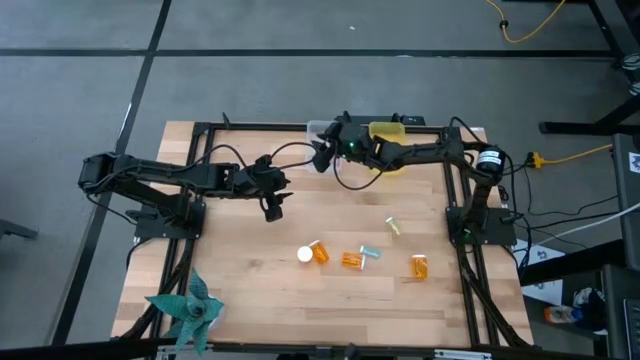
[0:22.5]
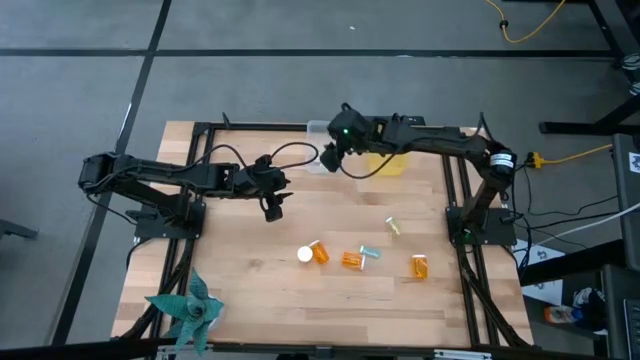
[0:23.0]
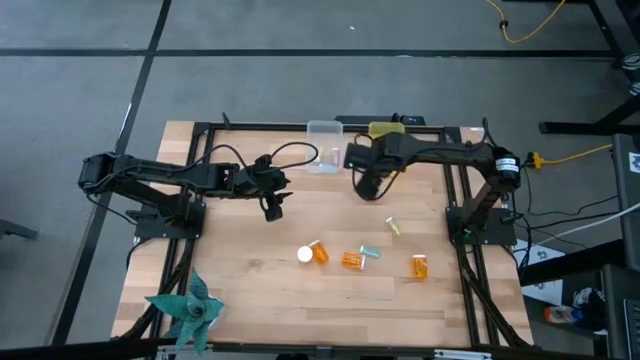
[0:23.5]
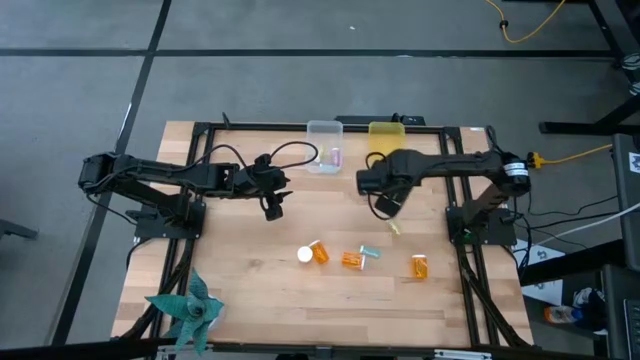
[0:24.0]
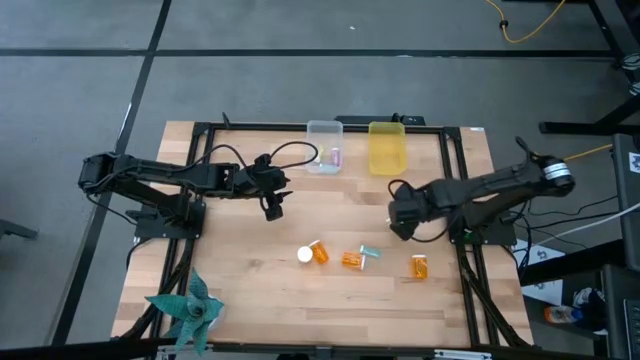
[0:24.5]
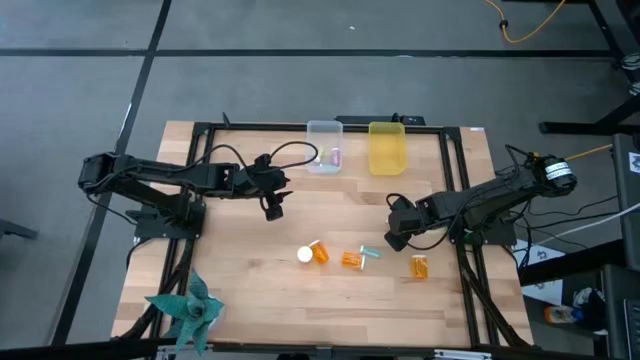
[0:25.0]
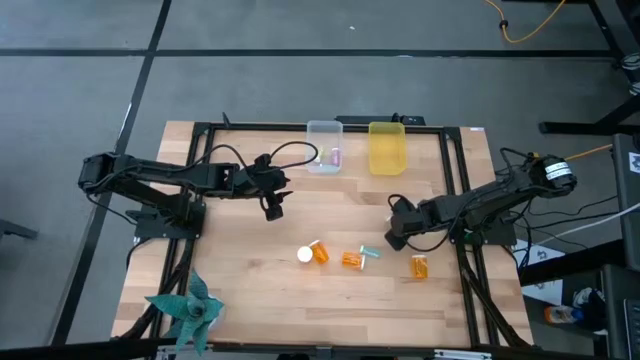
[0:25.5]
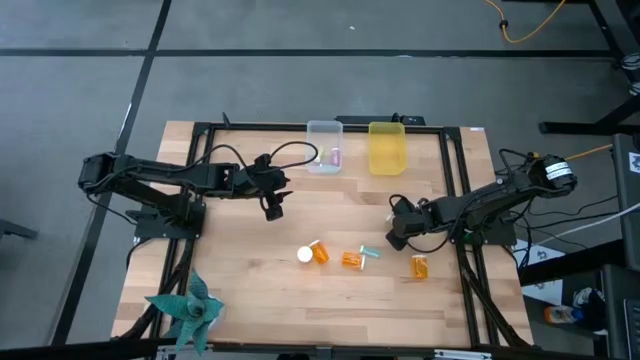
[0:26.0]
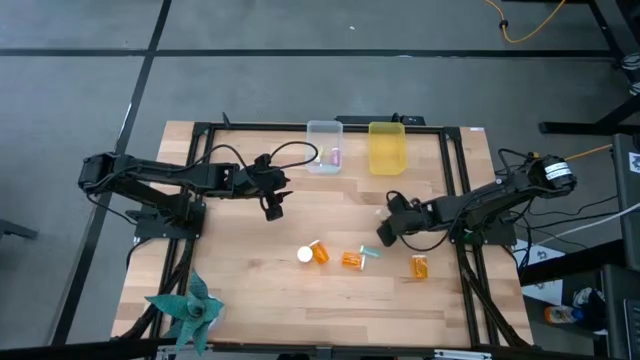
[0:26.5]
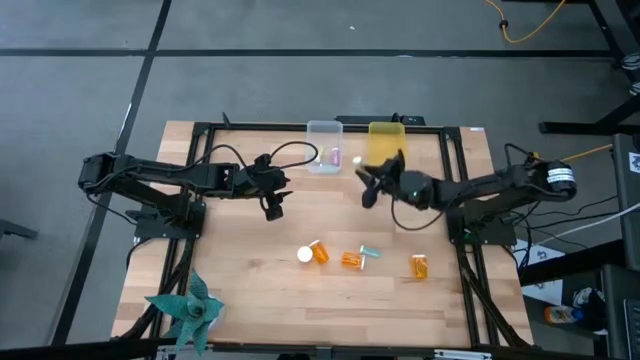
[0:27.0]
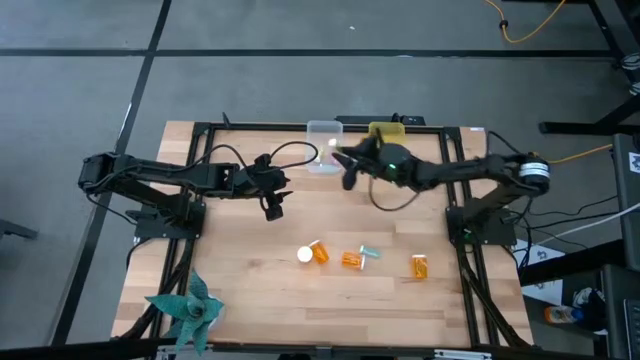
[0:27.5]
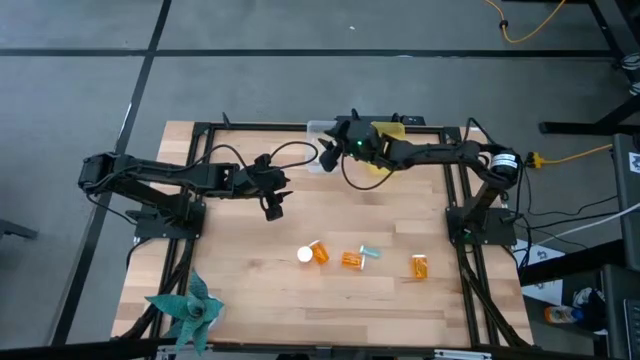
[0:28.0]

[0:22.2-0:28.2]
Task: Pick and place medicine bottles into bin by pill shape (circle, oval)
Put the small yellow pill bottle into the transparent bin

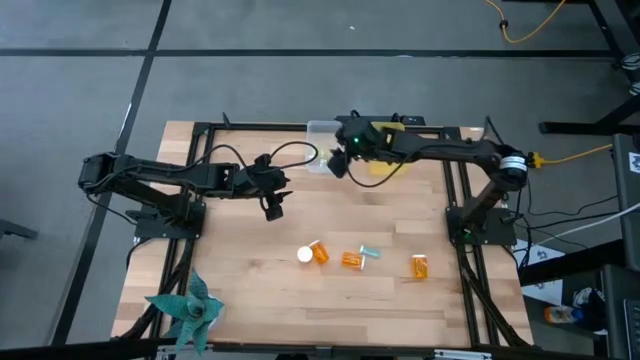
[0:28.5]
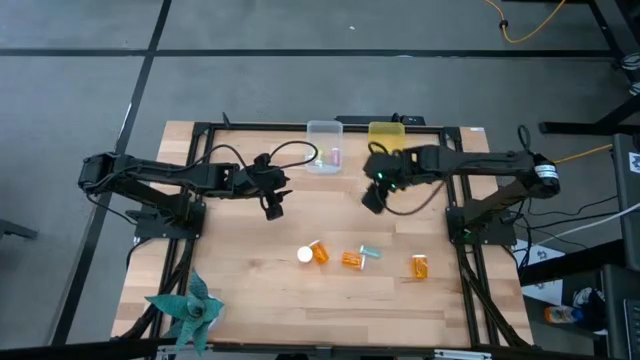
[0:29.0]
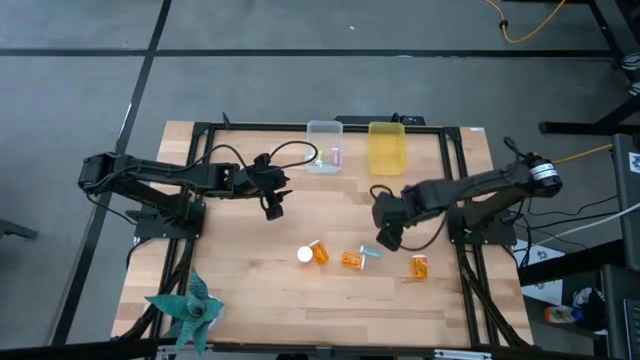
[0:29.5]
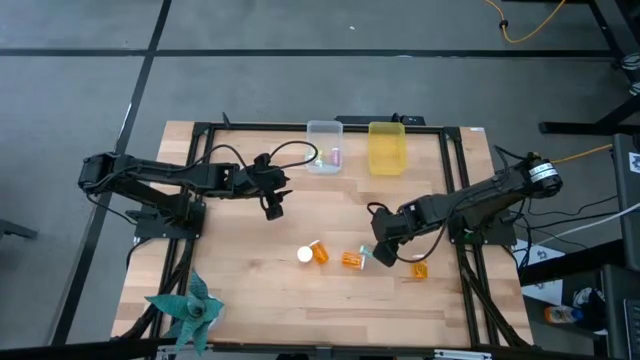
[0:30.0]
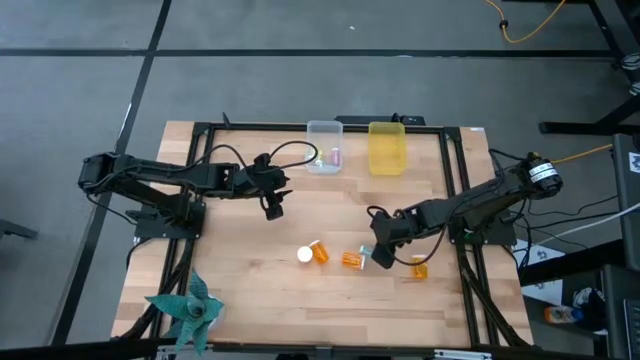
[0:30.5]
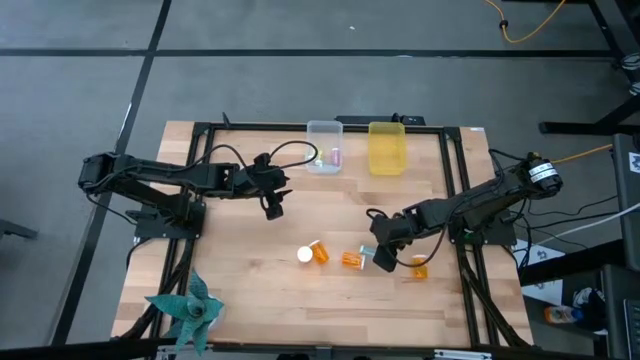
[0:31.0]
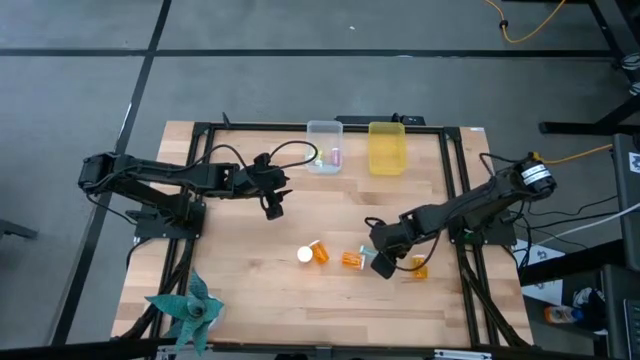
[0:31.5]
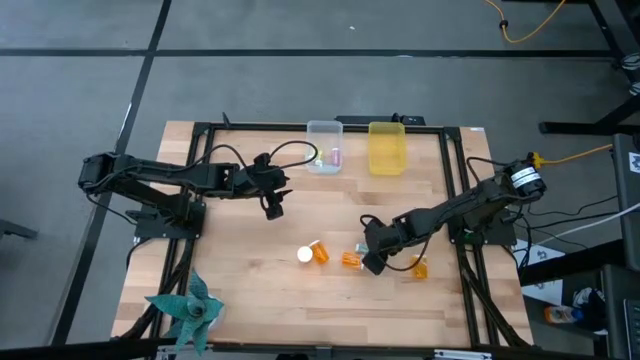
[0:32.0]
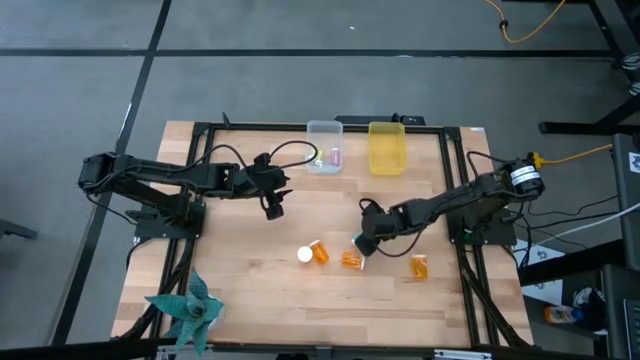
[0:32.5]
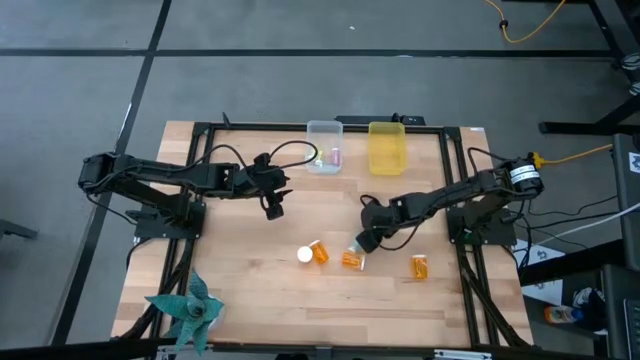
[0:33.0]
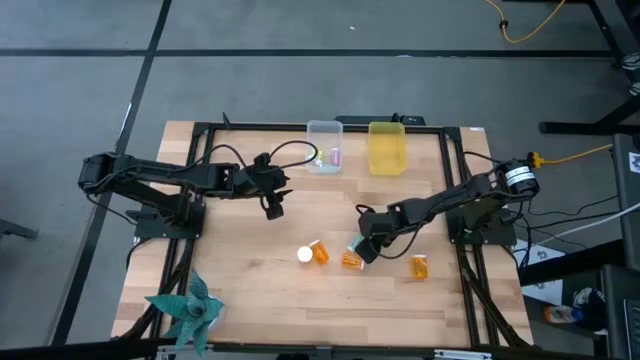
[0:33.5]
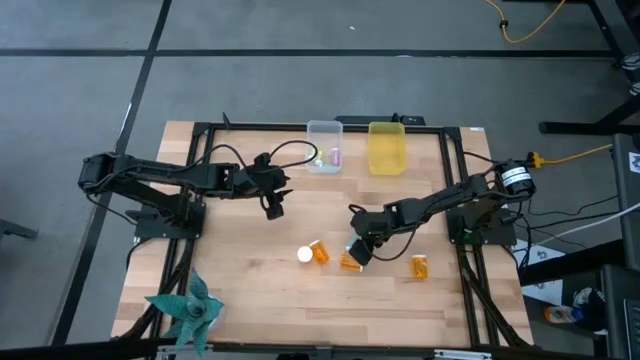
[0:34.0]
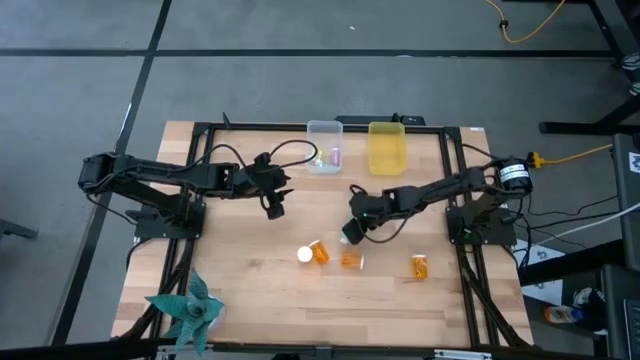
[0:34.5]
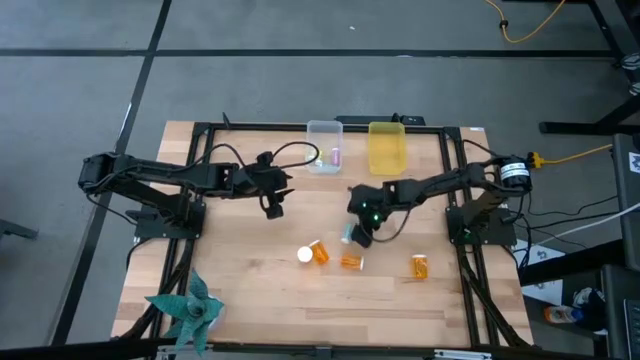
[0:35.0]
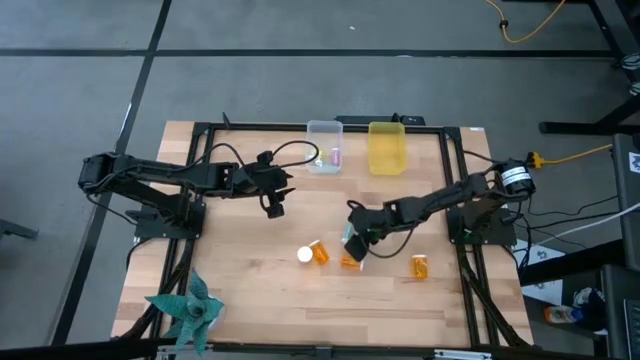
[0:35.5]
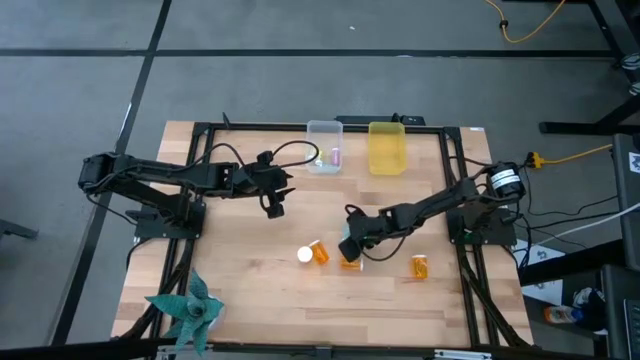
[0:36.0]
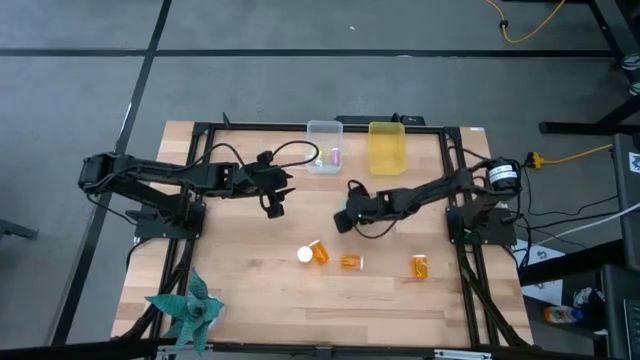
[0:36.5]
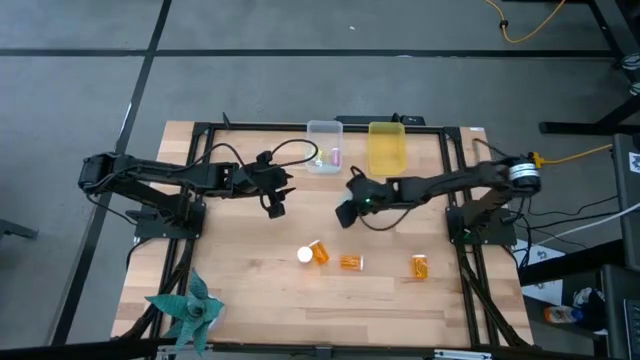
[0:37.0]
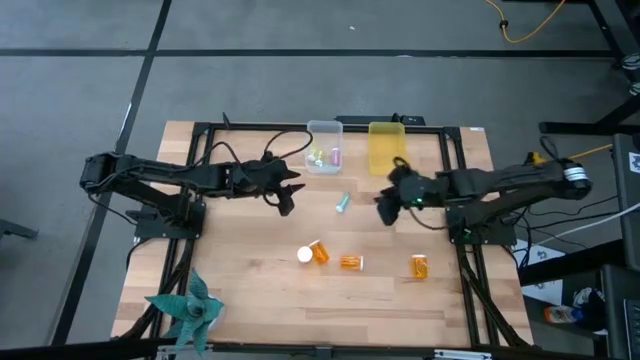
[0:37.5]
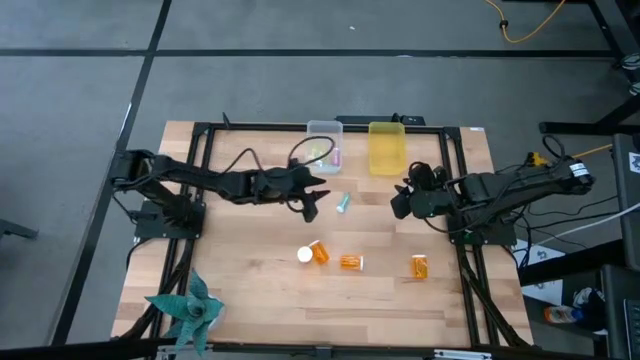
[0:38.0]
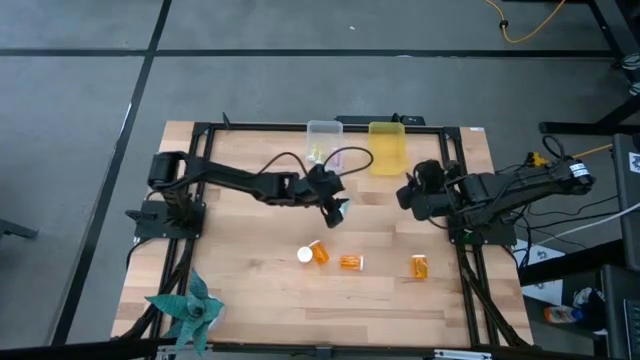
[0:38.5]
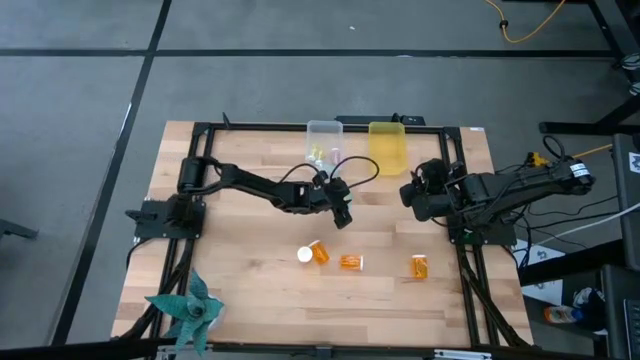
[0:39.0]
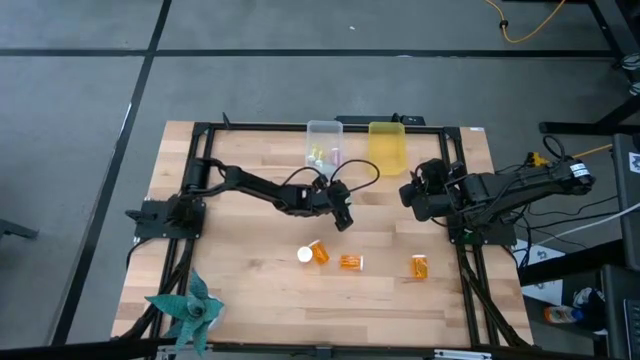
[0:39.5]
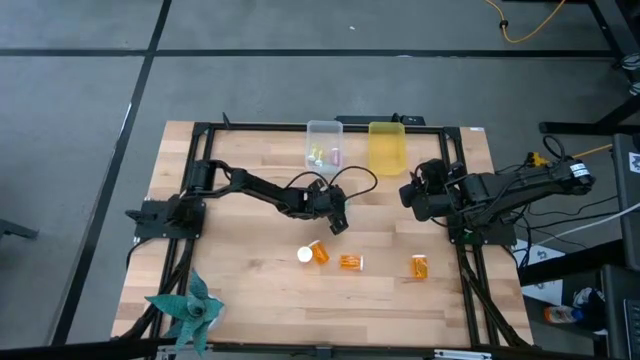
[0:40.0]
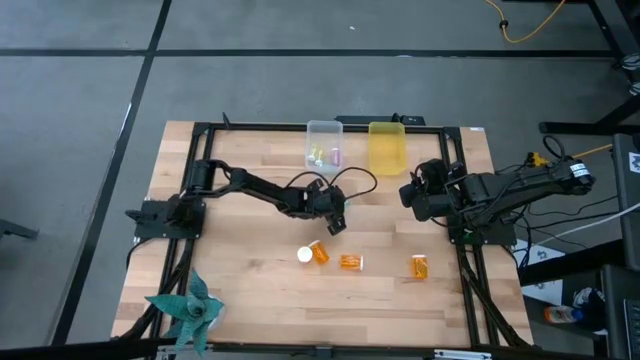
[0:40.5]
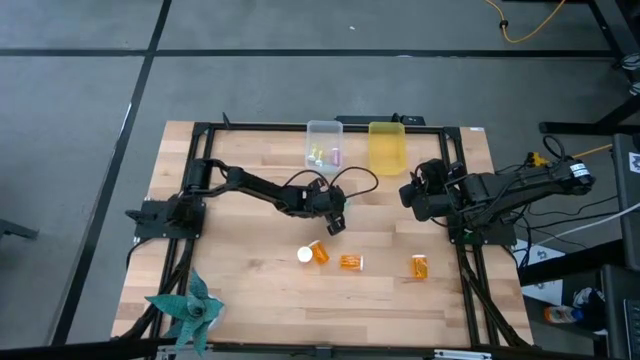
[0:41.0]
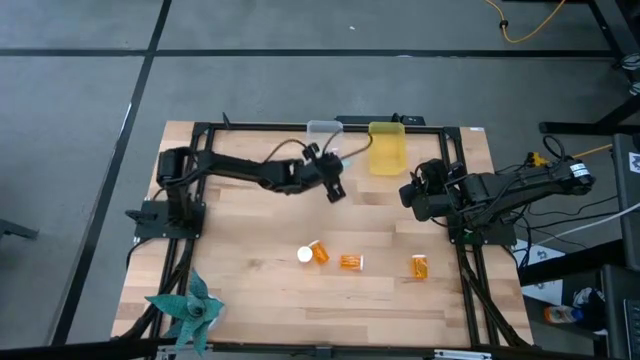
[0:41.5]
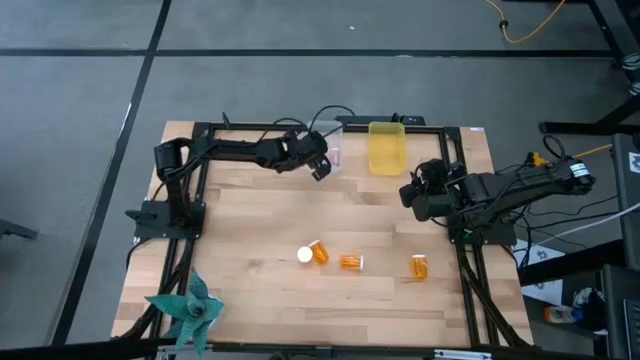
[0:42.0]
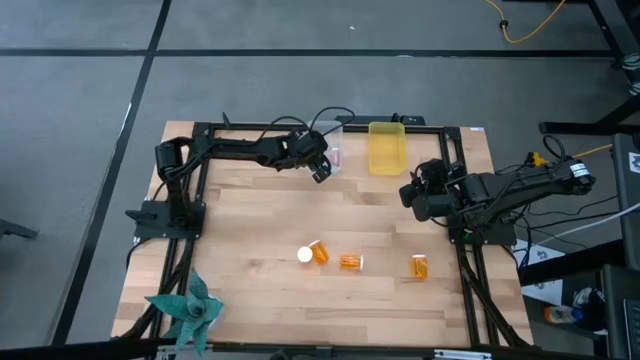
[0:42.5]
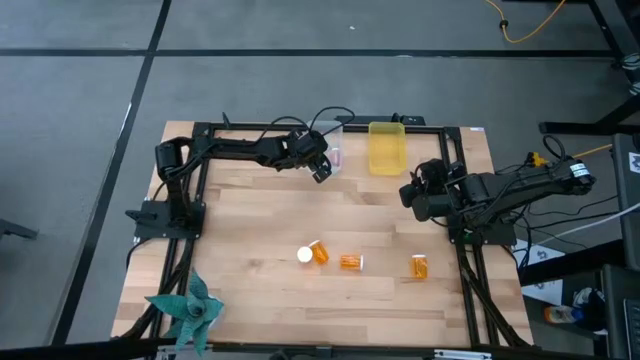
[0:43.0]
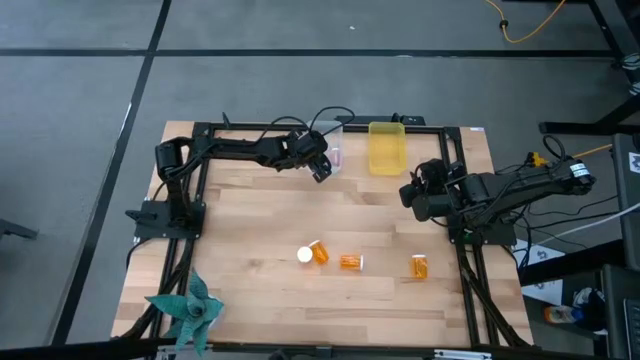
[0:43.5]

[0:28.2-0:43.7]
Put the small blue pill bottle into the transparent bin
